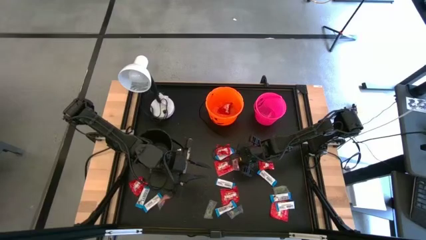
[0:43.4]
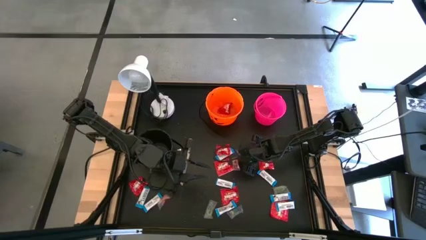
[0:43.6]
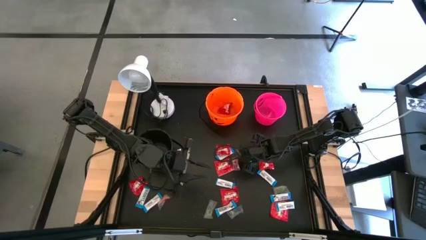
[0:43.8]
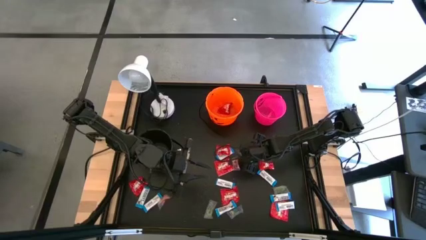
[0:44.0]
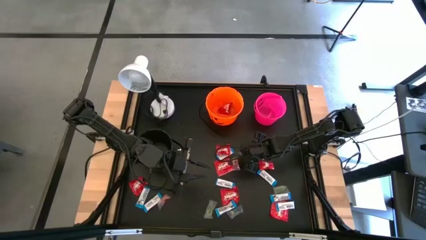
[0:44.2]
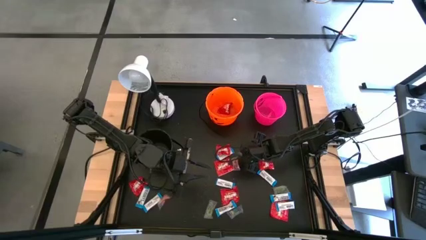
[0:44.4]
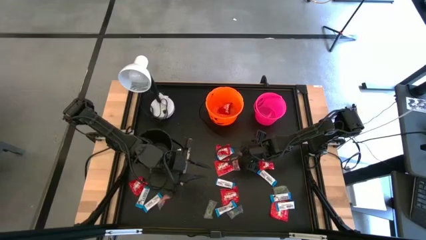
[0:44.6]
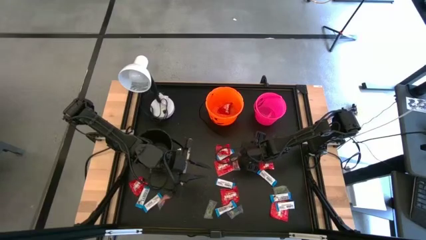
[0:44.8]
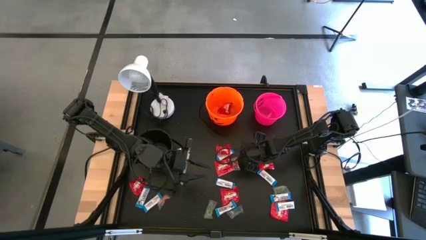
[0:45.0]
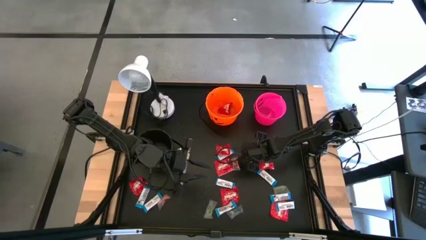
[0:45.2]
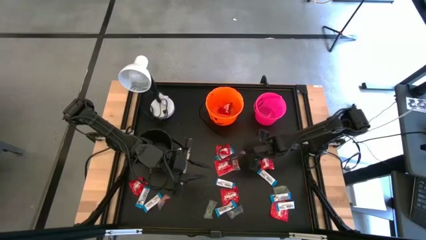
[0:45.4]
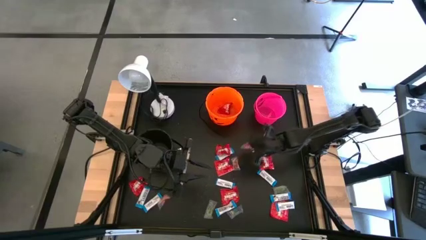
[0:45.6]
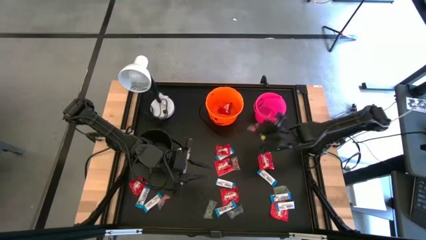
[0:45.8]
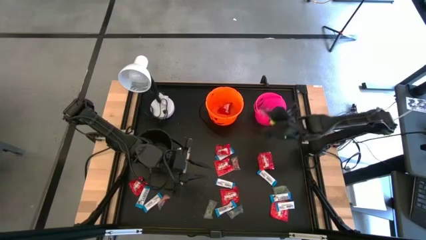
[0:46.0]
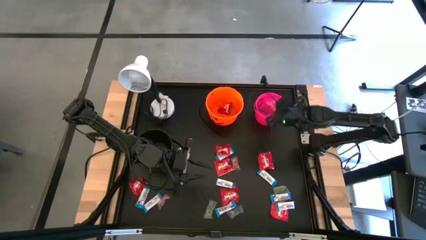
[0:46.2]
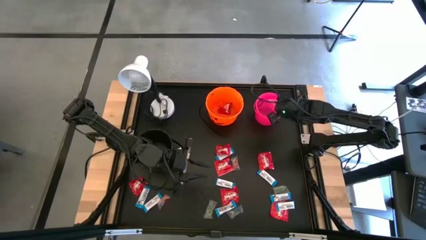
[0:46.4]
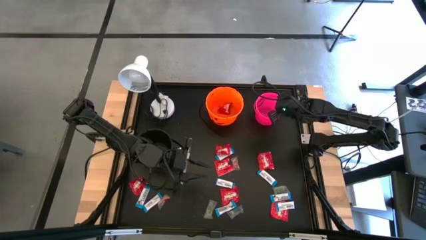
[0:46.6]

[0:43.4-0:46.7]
Task: Sort candy
Put the orange candy into the pink bucket

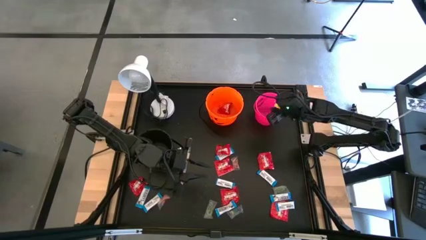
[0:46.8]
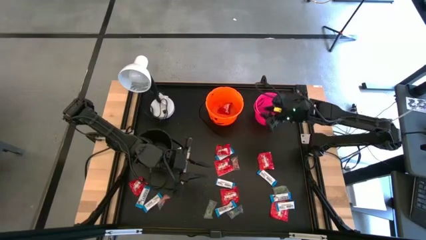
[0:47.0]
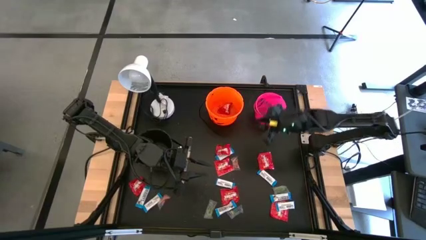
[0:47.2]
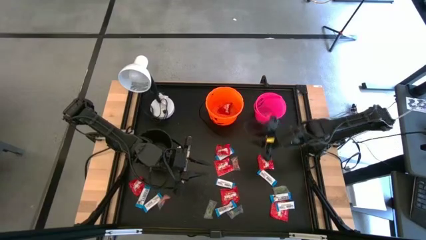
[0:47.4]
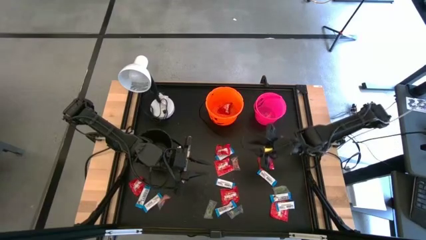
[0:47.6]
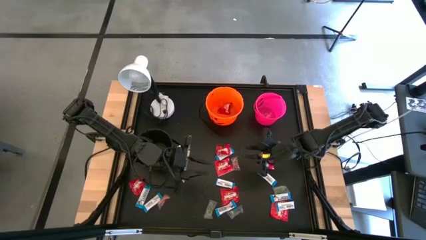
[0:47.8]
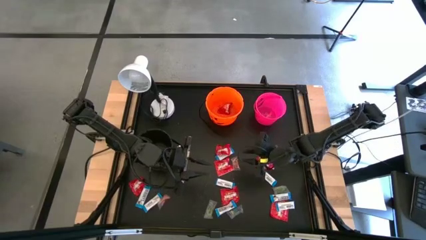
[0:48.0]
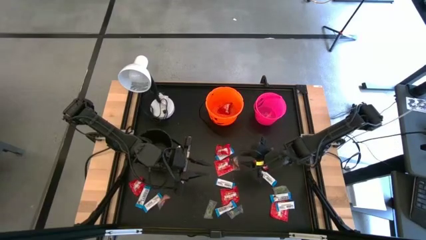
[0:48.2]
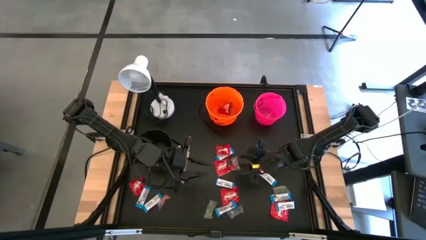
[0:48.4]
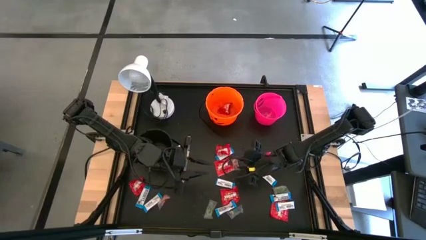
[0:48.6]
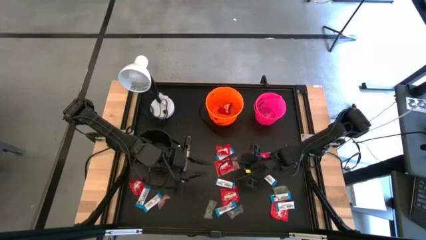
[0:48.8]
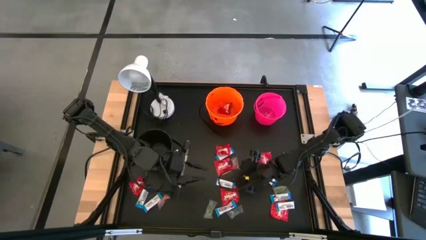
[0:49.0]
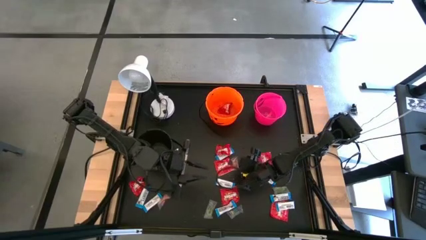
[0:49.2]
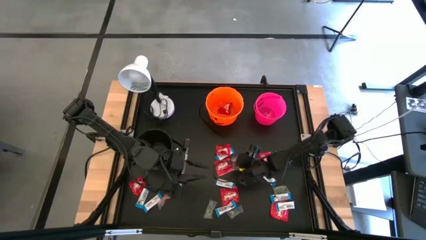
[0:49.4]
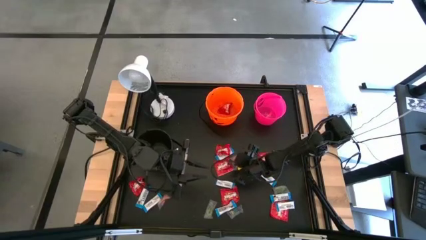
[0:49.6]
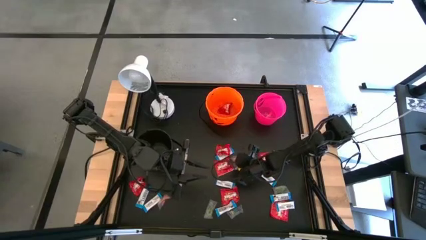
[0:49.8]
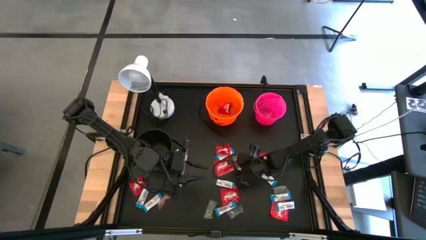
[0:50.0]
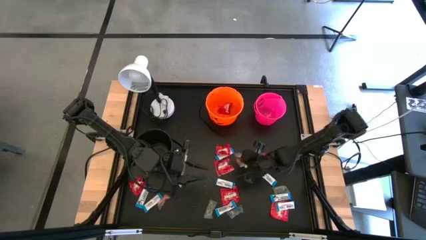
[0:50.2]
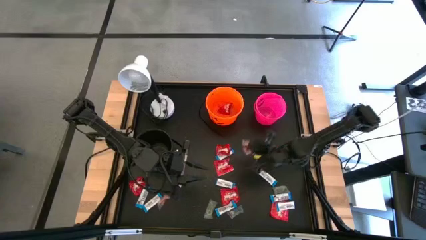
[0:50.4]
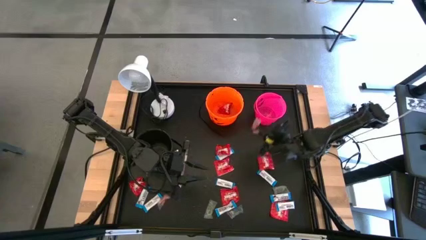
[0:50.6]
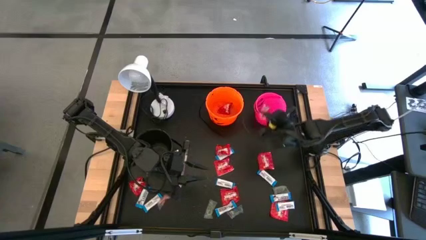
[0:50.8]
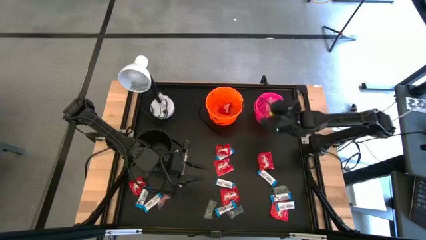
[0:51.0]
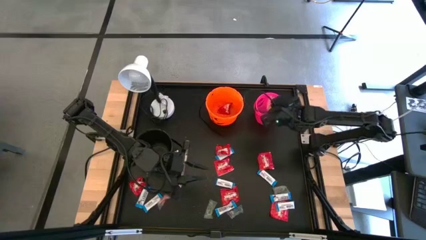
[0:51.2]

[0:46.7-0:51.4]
Put the orange candy into the pink bucket

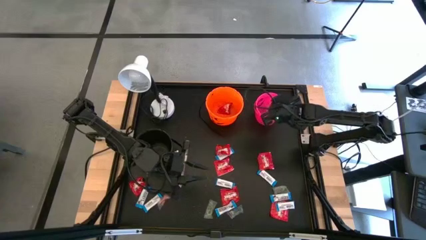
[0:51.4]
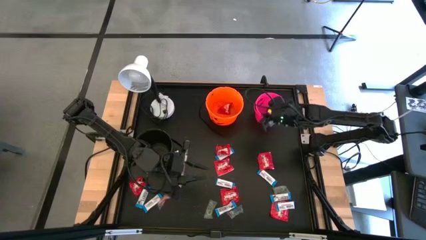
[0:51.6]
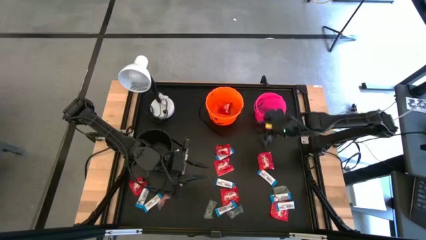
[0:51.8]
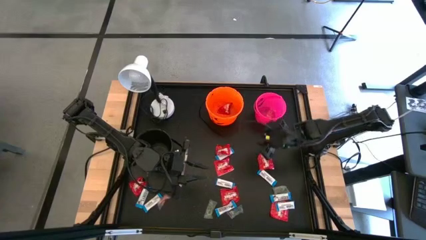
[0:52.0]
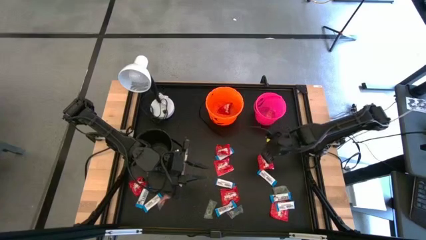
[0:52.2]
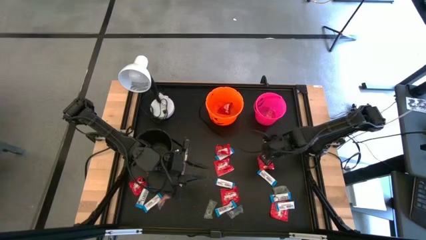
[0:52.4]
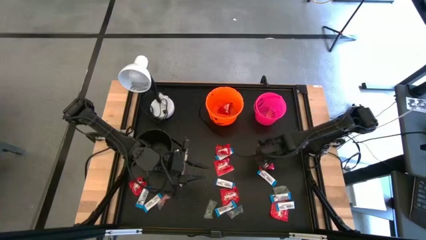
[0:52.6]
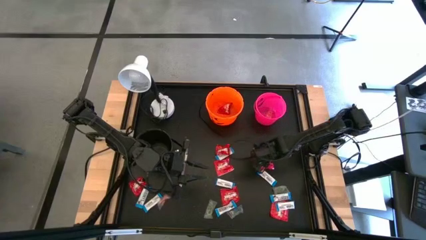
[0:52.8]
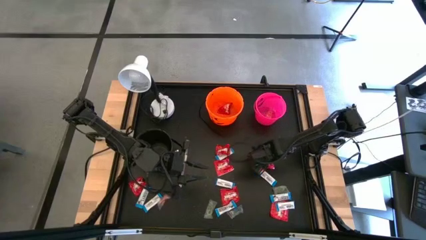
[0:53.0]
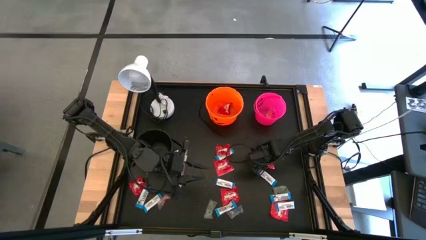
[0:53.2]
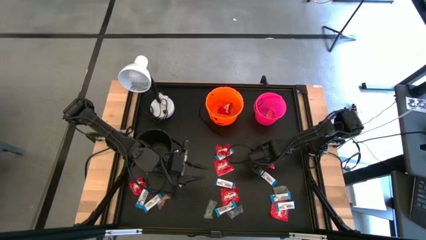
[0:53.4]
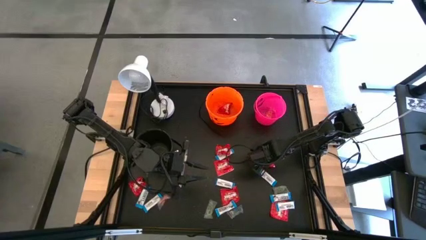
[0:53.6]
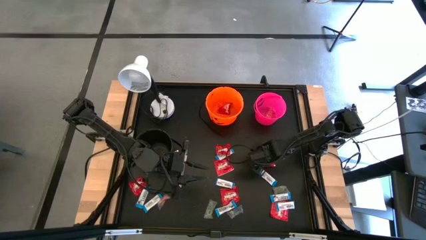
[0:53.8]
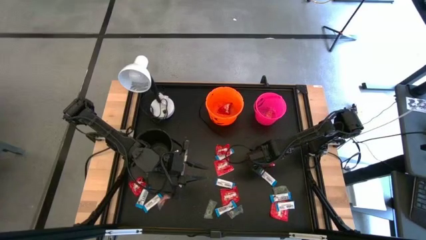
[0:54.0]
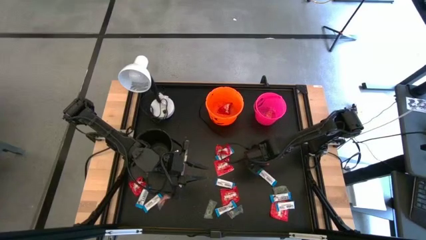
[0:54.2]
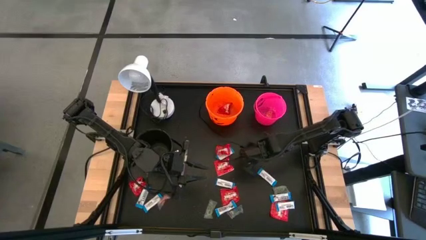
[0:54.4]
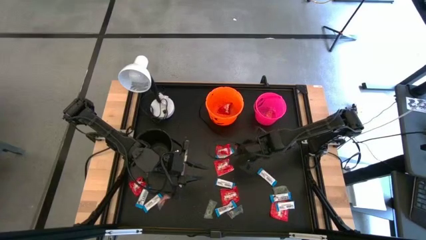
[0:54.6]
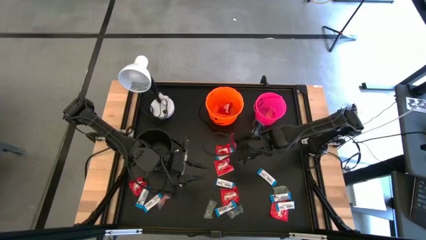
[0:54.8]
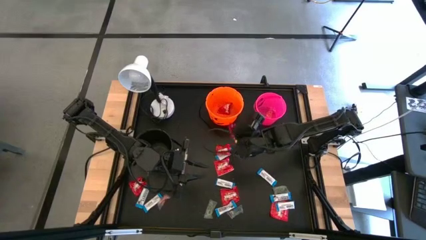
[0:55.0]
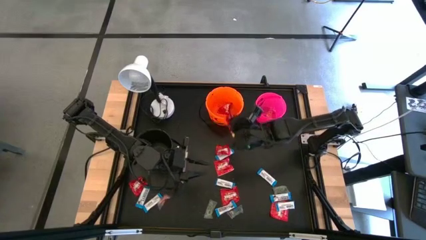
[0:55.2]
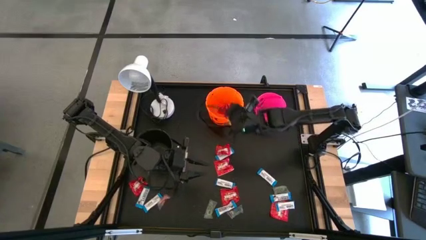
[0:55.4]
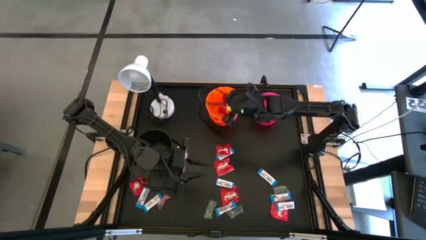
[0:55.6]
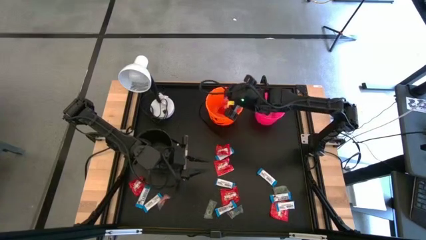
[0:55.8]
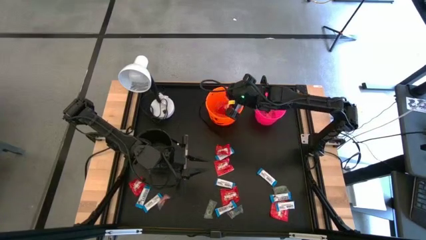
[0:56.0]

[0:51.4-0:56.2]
Put the red candy into the orange bucket

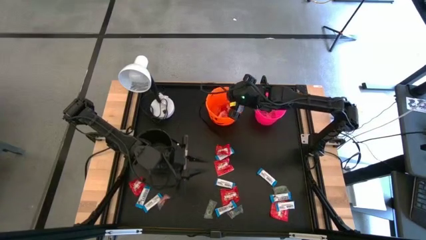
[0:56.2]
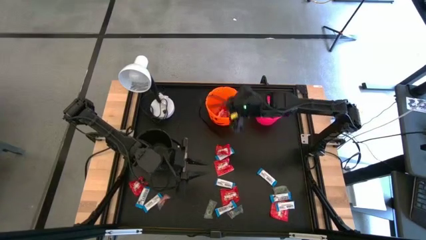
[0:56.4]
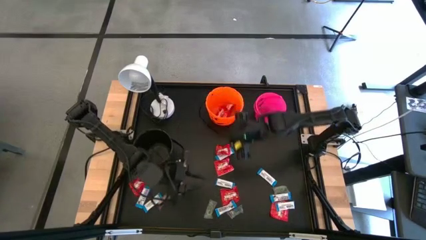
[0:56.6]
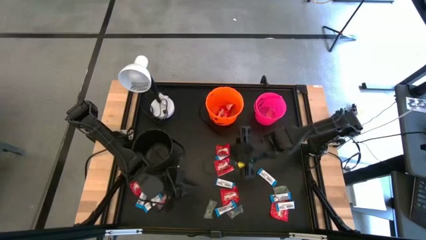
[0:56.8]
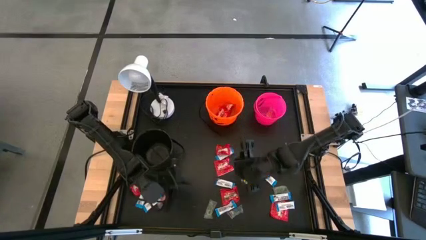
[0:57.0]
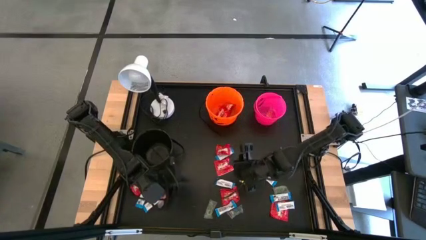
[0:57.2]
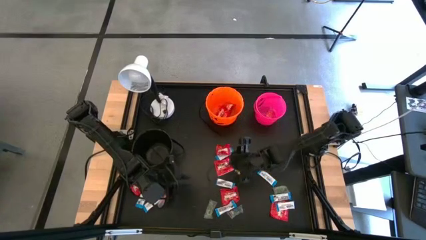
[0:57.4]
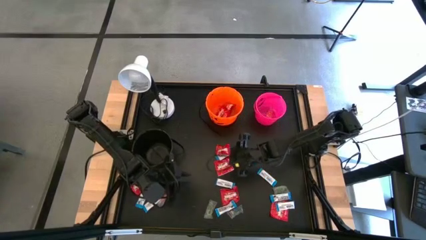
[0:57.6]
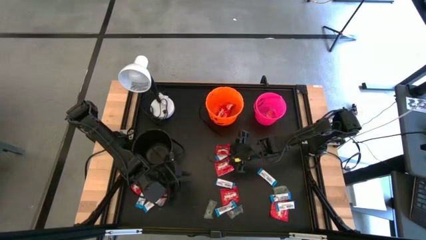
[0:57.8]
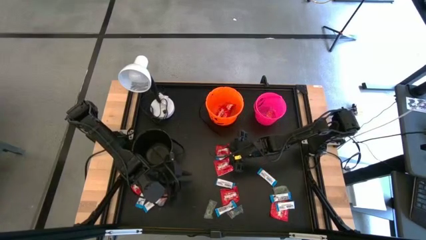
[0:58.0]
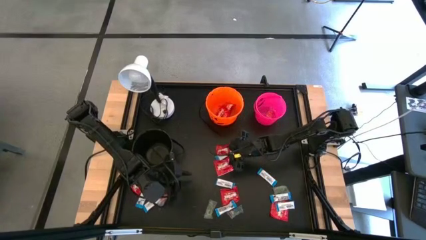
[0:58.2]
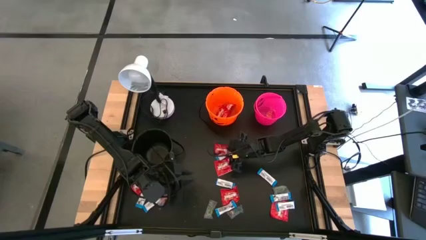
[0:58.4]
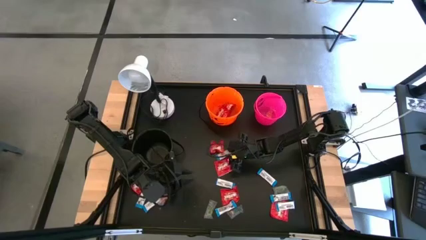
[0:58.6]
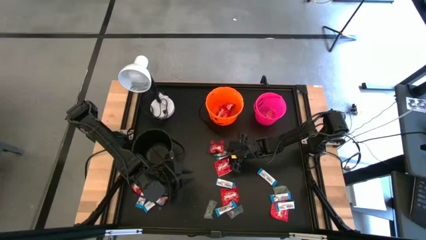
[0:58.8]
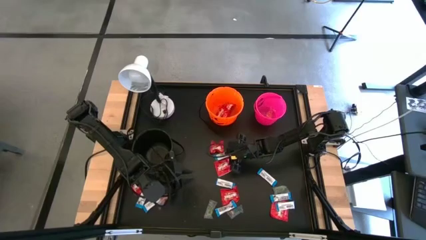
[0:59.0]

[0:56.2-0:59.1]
Put the red candy into the orange bucket
